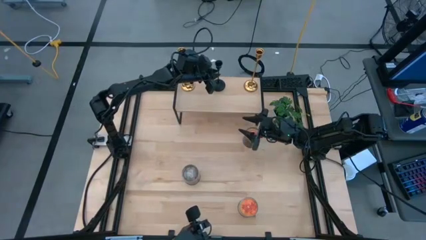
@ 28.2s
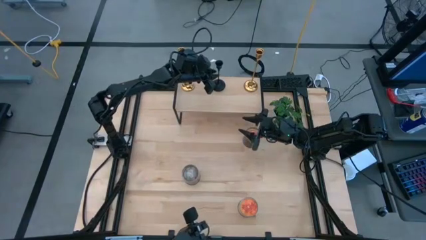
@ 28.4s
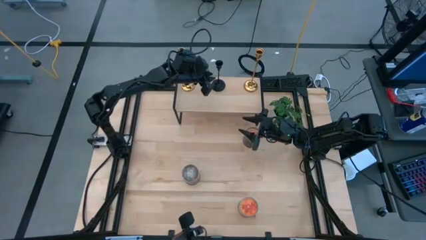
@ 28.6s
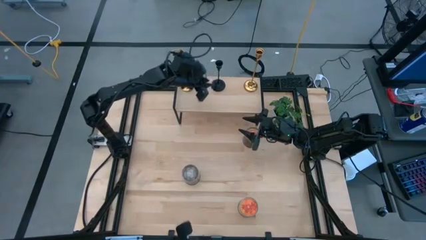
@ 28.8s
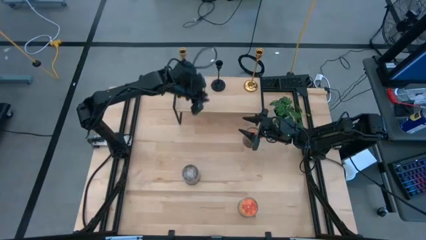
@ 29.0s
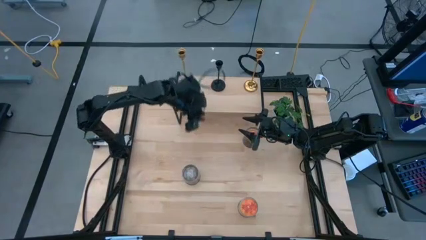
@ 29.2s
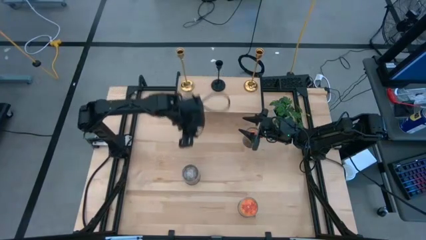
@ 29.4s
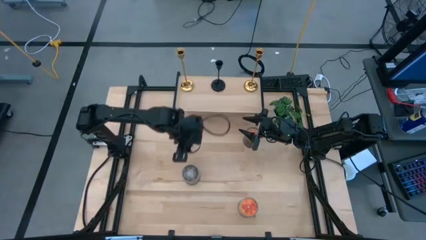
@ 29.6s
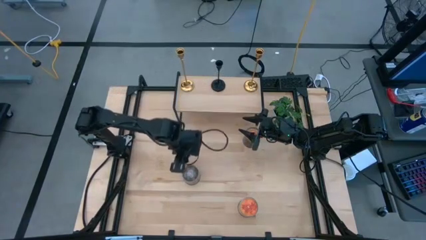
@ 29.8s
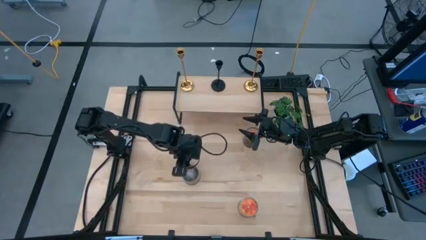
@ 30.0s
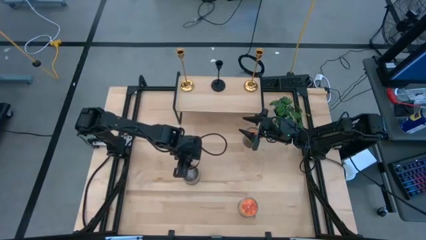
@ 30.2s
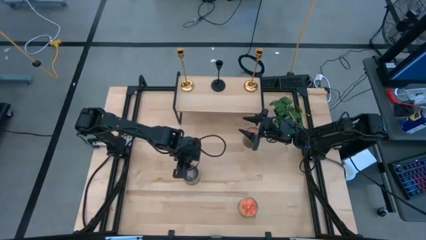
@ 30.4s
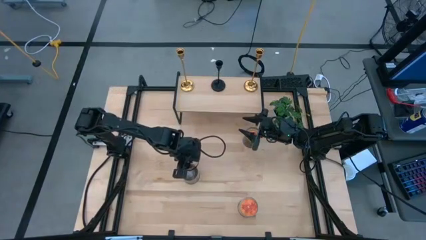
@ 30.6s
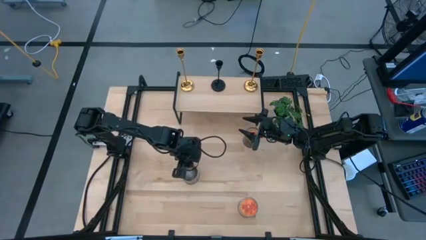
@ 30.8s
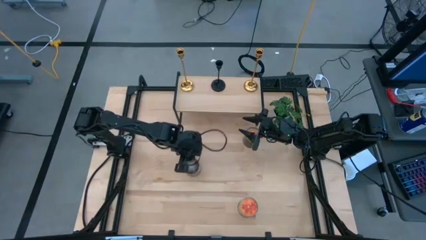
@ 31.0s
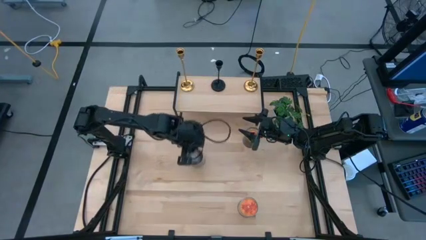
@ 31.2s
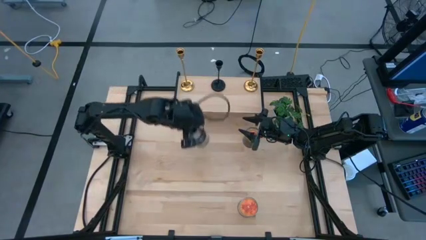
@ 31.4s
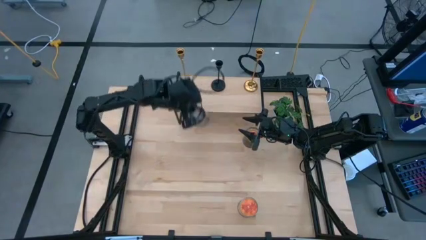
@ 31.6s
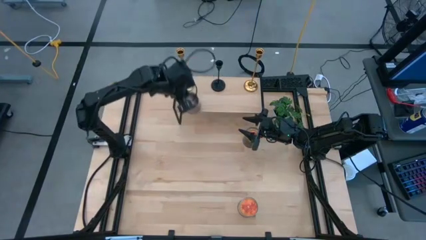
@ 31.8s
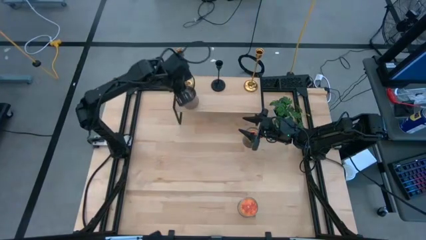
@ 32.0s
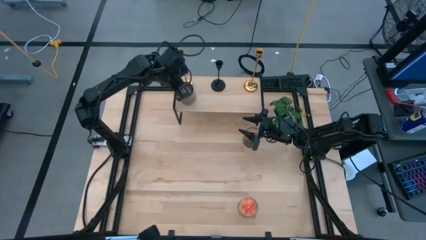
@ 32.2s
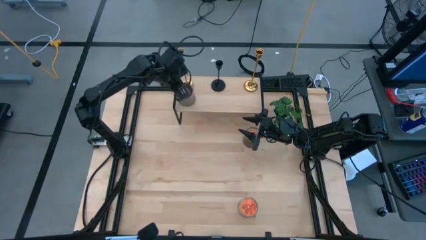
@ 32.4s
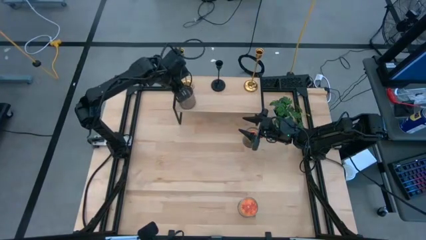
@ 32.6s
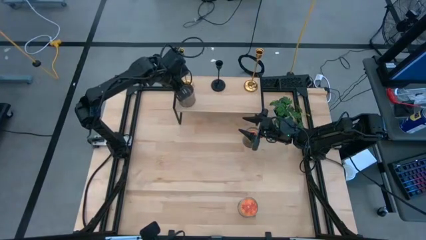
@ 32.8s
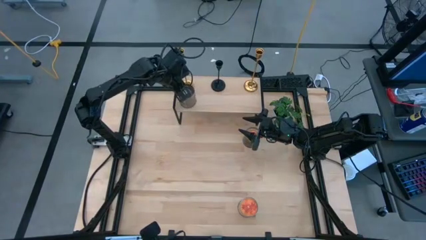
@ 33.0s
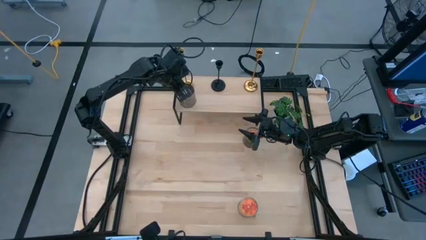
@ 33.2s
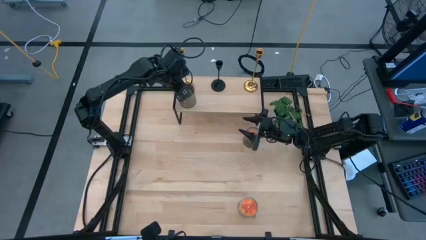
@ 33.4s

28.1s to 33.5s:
Task: Pick & Place candle stick holders
Put the brown scented candle on the shelf

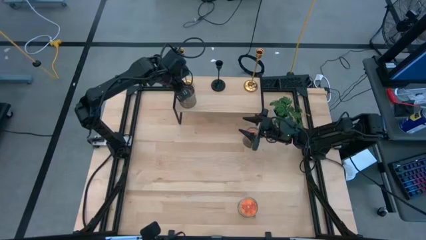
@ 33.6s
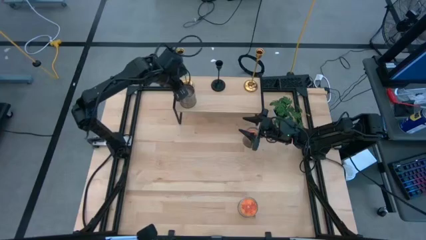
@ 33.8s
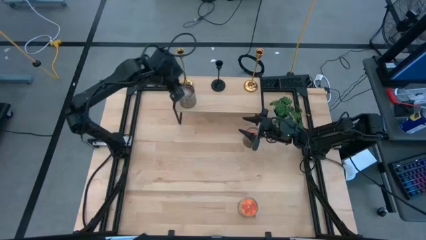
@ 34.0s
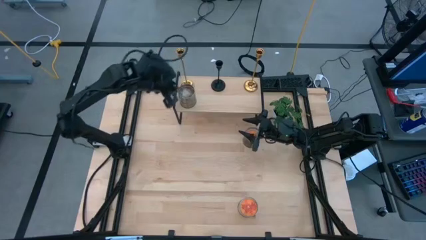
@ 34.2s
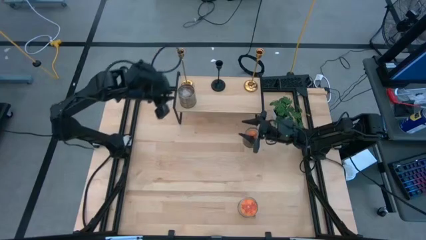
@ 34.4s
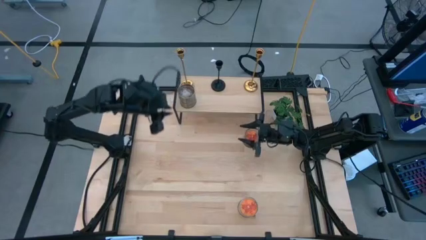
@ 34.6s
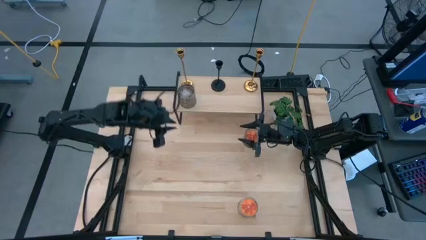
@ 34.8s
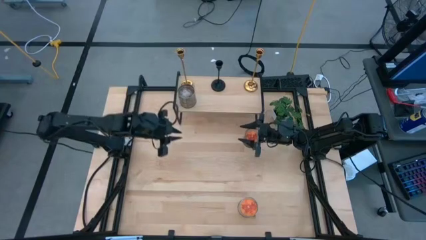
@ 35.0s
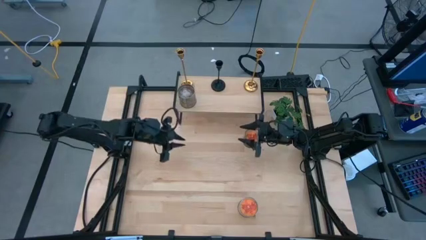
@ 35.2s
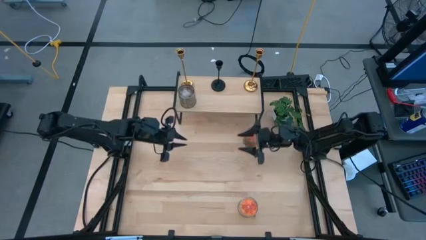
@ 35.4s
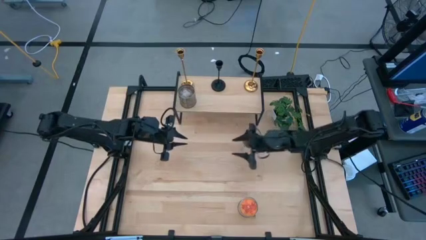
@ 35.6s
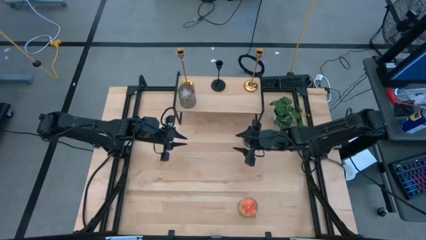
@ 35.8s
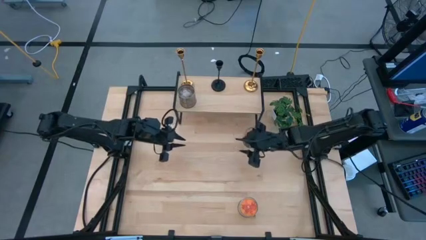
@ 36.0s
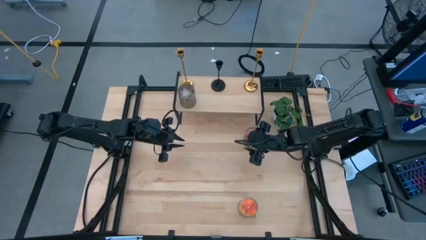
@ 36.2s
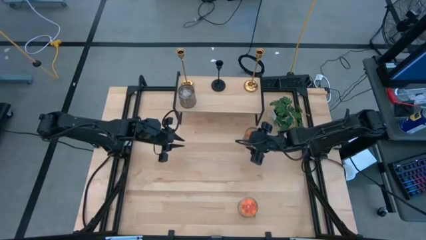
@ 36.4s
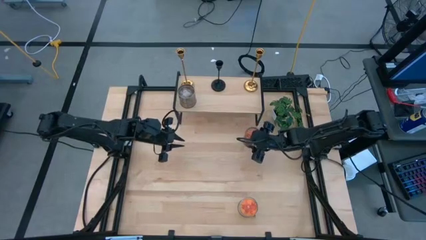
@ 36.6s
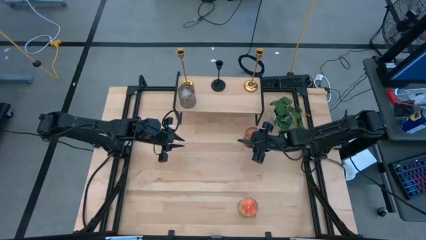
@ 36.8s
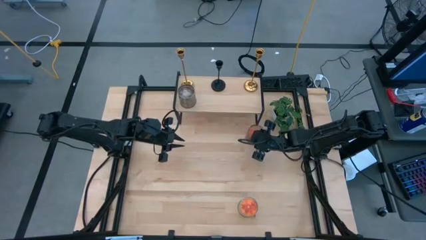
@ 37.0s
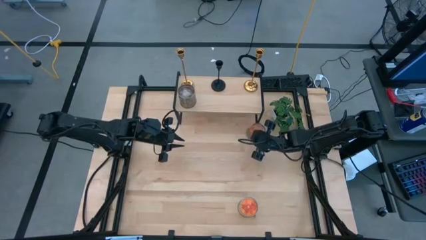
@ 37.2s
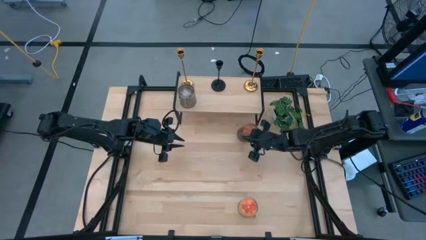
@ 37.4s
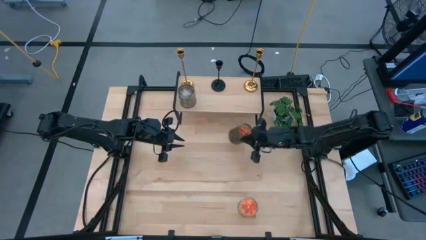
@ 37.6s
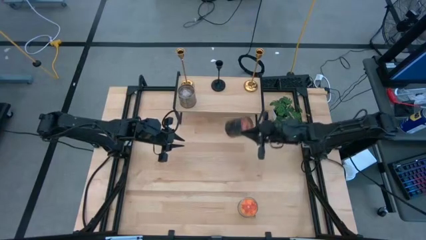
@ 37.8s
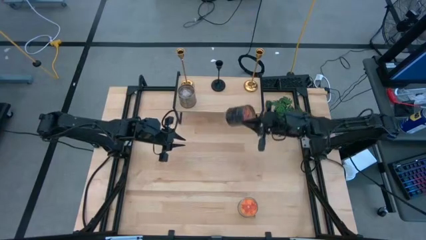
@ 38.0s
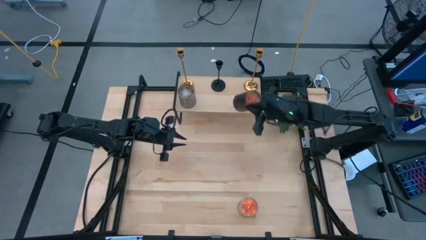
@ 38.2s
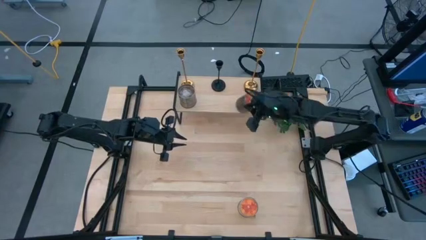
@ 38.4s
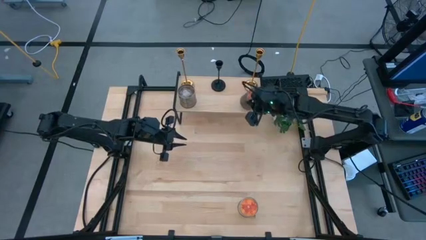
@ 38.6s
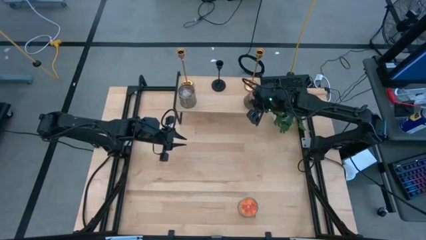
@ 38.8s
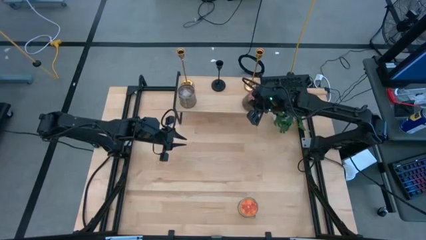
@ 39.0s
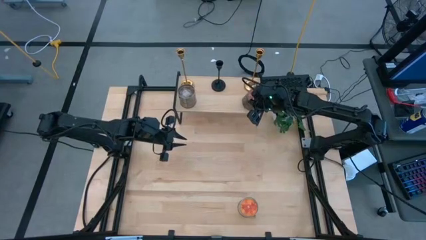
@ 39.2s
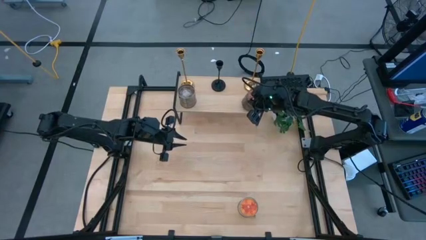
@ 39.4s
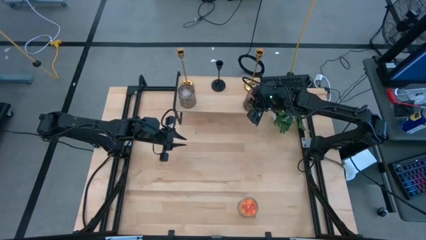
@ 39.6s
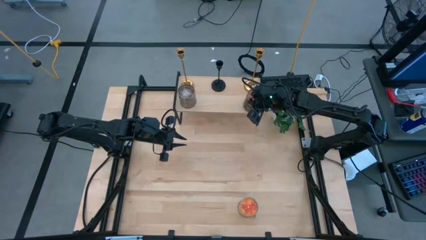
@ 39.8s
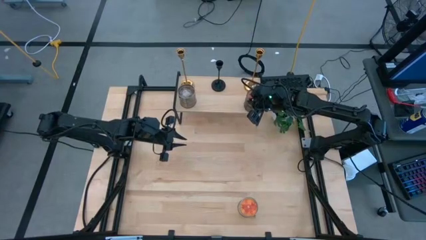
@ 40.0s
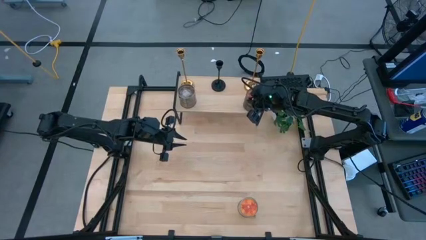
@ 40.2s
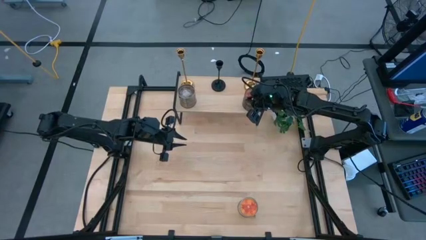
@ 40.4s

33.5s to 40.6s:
Put the top orange scented candle on the shelf

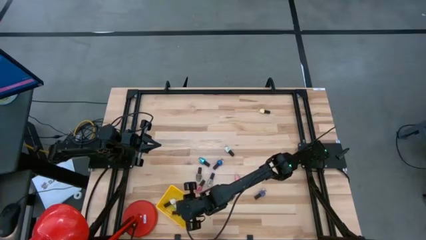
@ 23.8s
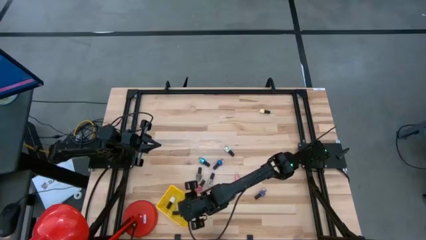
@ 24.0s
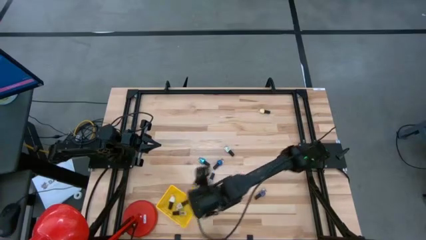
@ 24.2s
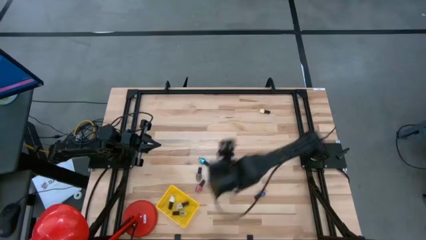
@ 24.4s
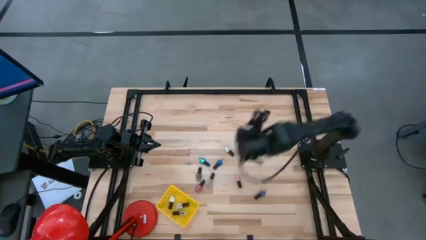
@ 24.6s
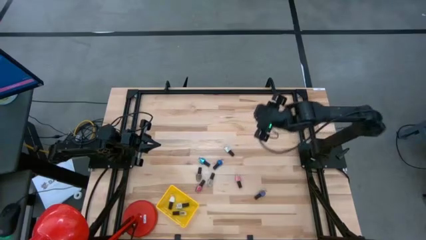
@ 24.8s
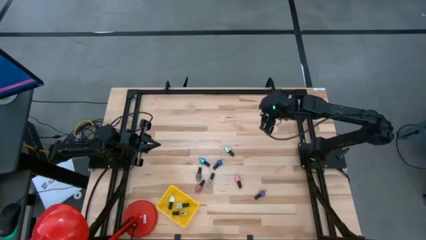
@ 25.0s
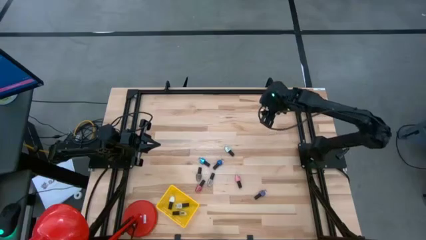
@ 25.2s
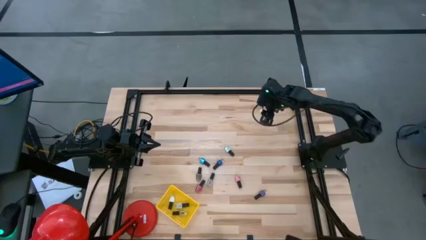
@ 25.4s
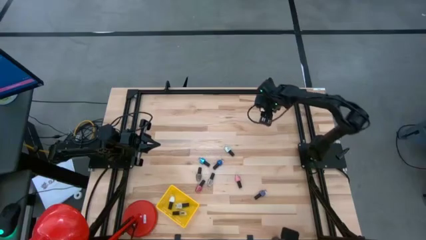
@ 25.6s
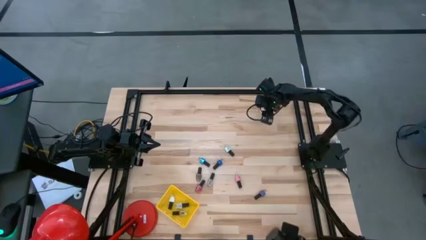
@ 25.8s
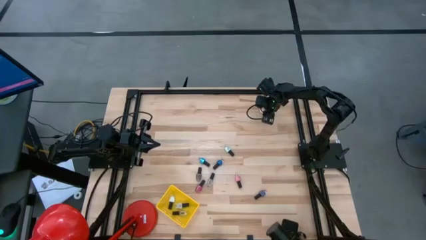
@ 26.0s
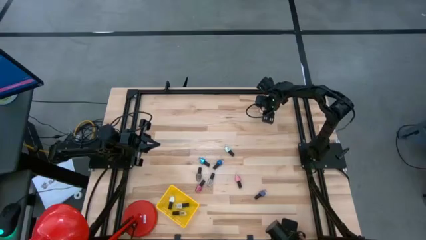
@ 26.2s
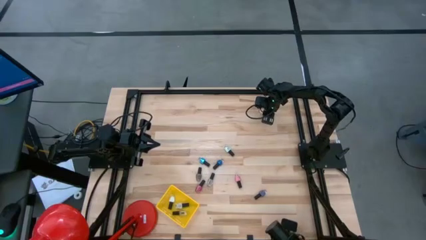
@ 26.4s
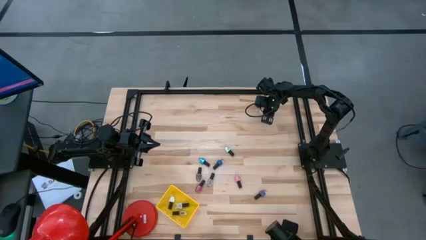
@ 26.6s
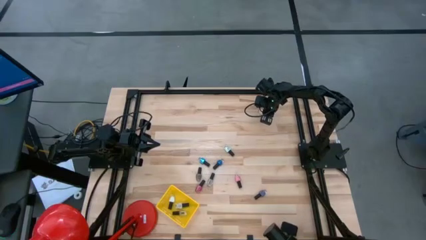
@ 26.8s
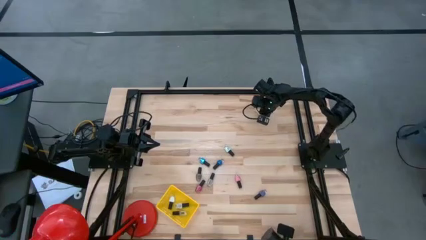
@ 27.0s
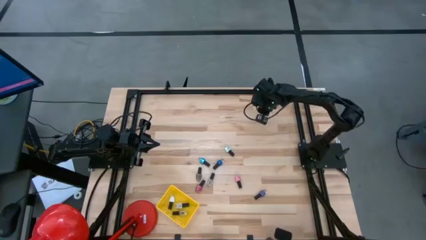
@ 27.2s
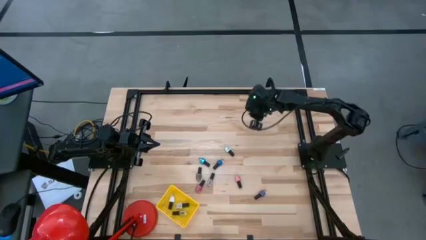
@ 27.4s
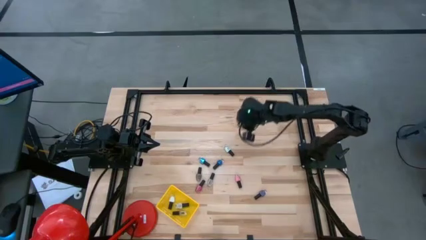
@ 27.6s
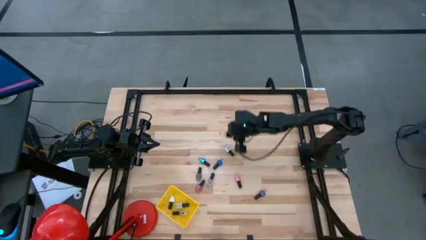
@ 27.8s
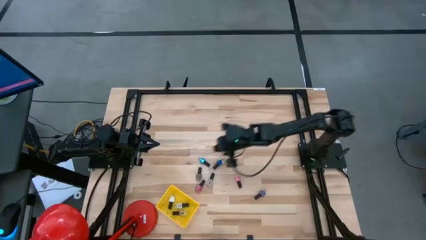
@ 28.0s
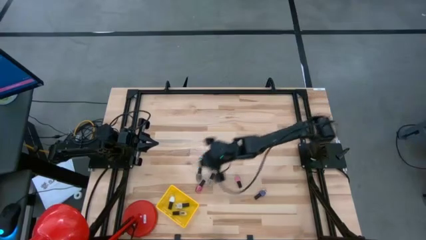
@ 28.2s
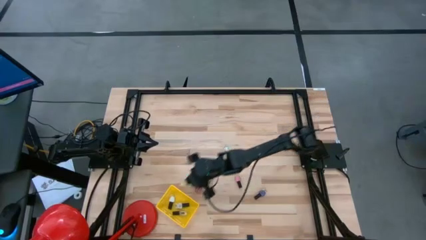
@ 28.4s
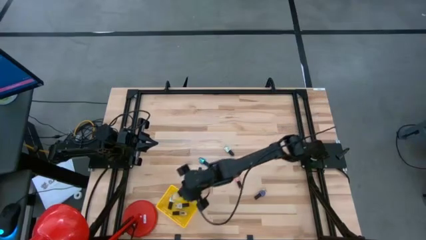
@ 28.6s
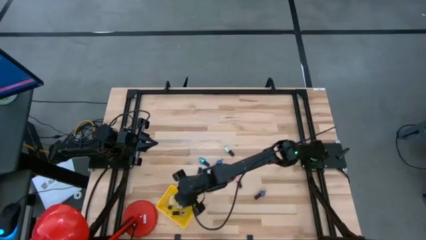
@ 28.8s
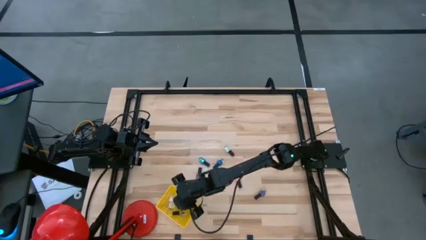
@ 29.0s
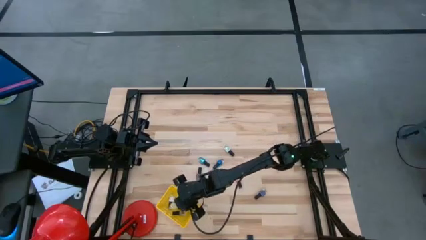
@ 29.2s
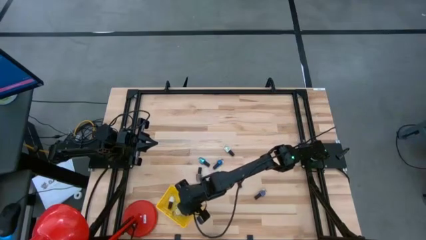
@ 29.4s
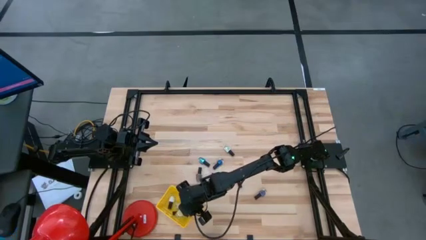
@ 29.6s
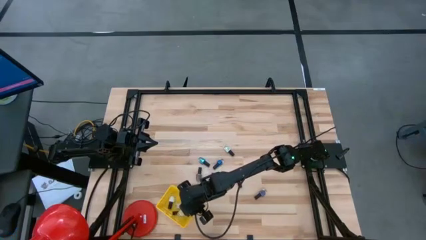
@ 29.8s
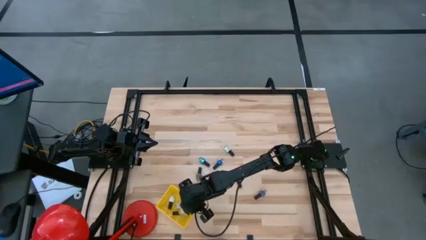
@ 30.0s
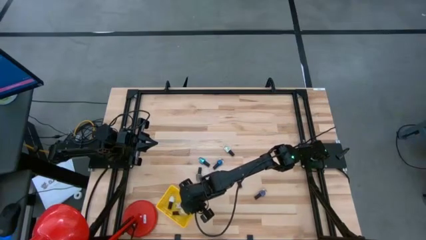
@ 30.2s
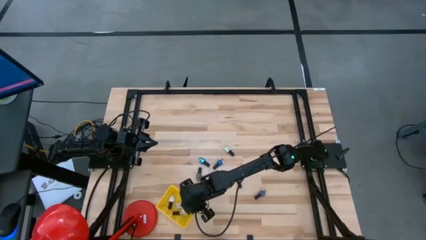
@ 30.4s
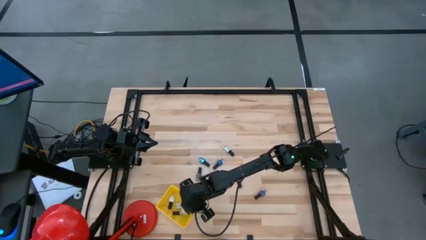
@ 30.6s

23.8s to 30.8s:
Task: Pick & Place Nail Polish
Put the yellow nail polish into the yellow basket
